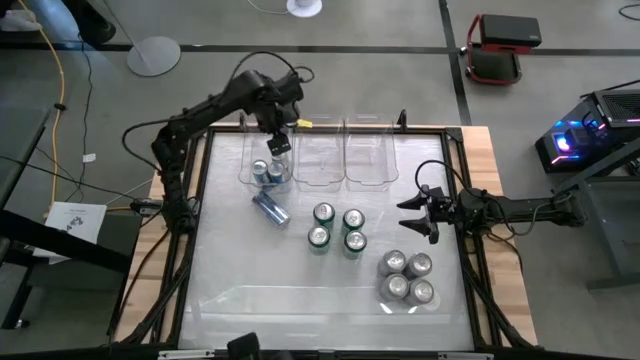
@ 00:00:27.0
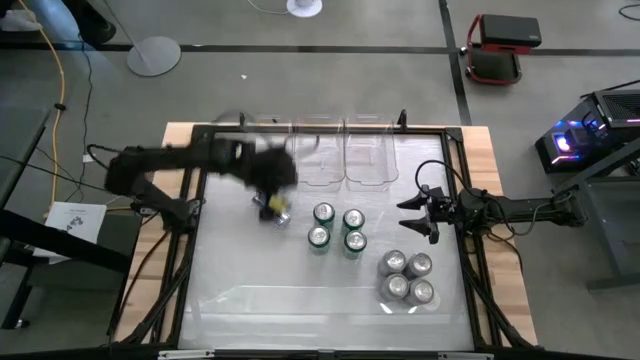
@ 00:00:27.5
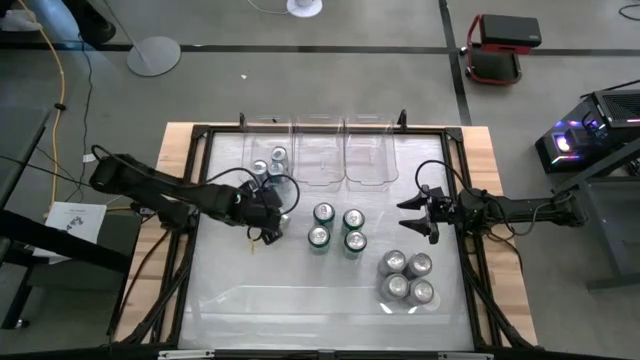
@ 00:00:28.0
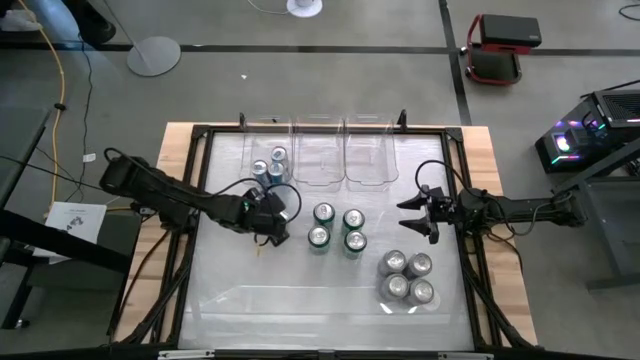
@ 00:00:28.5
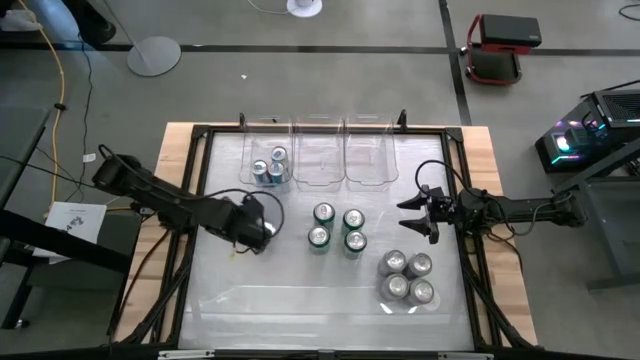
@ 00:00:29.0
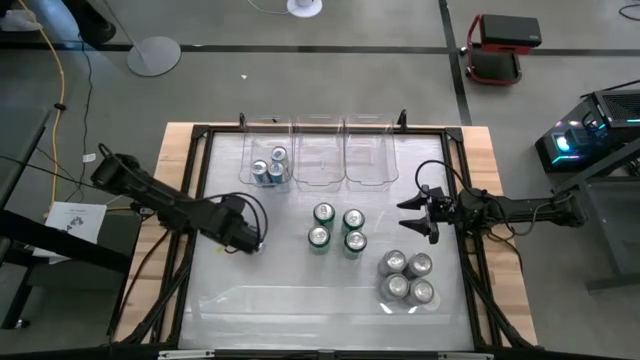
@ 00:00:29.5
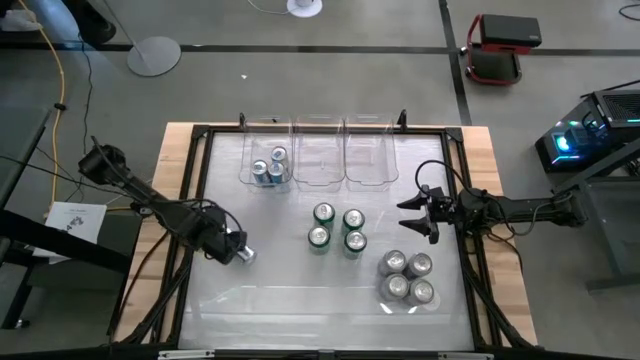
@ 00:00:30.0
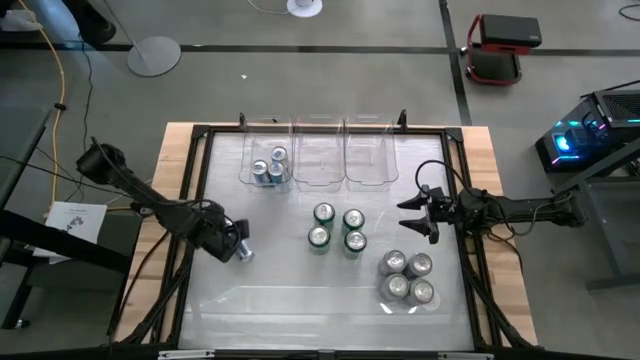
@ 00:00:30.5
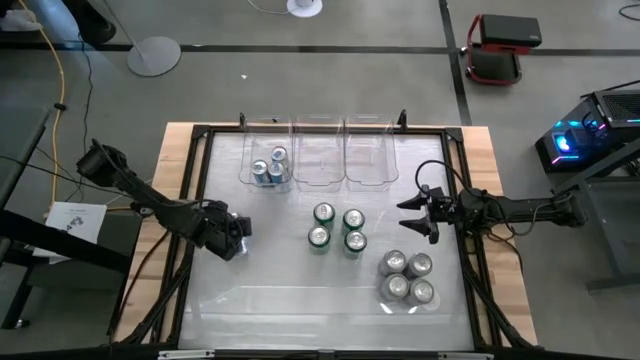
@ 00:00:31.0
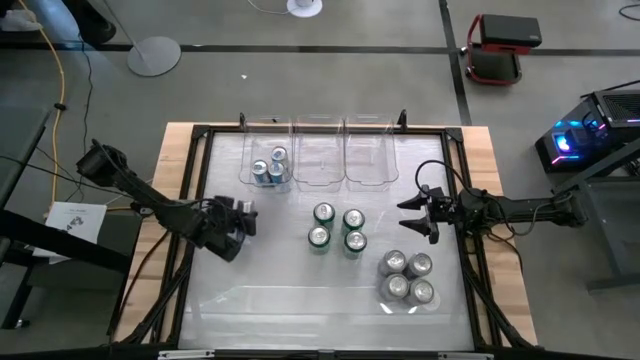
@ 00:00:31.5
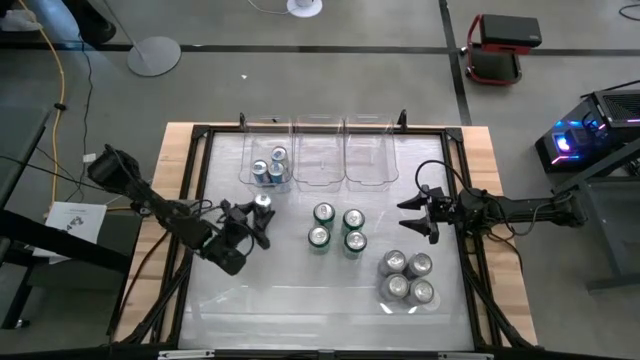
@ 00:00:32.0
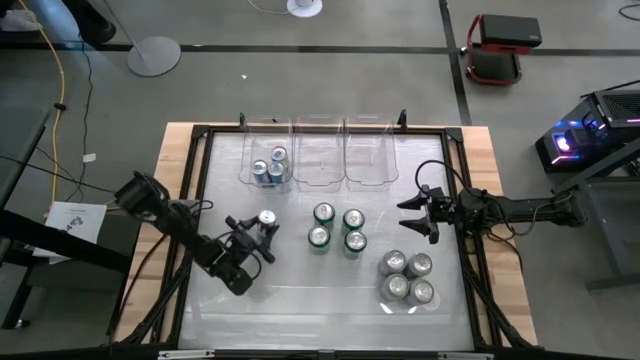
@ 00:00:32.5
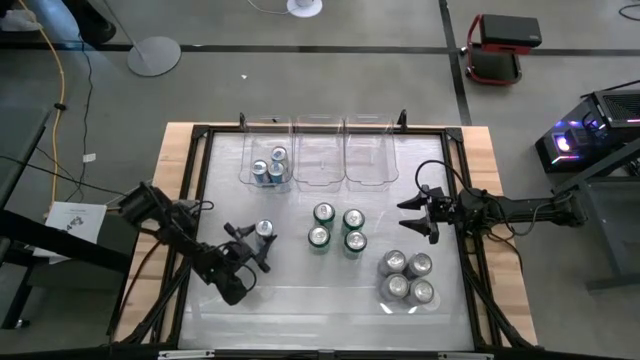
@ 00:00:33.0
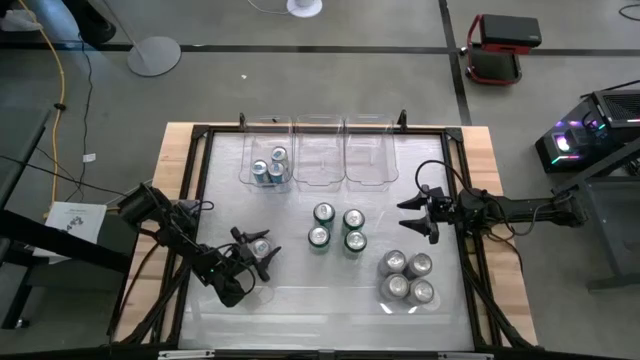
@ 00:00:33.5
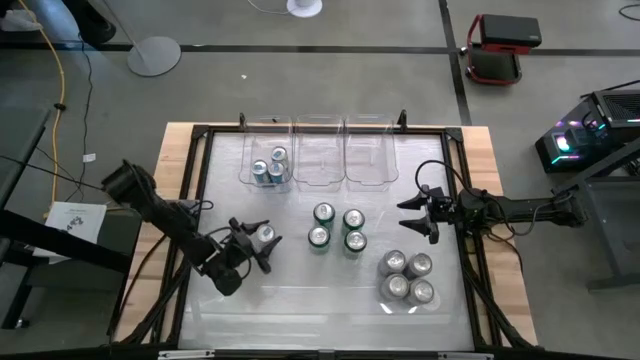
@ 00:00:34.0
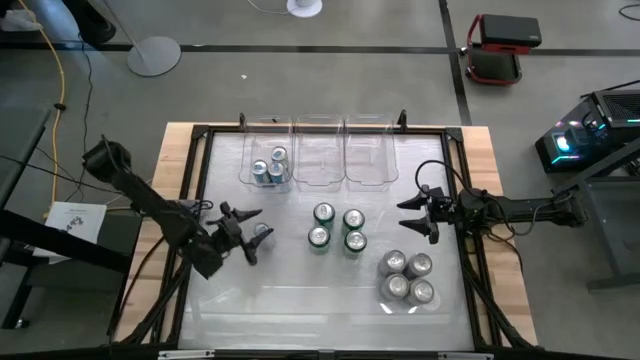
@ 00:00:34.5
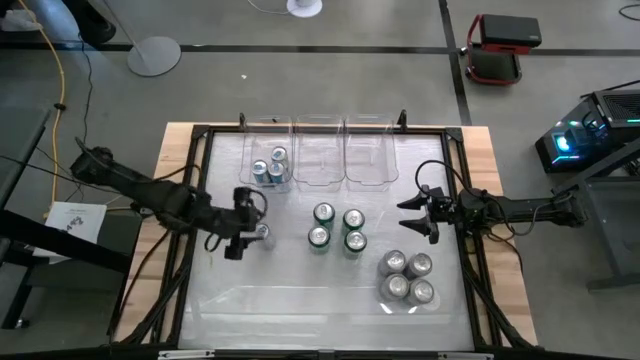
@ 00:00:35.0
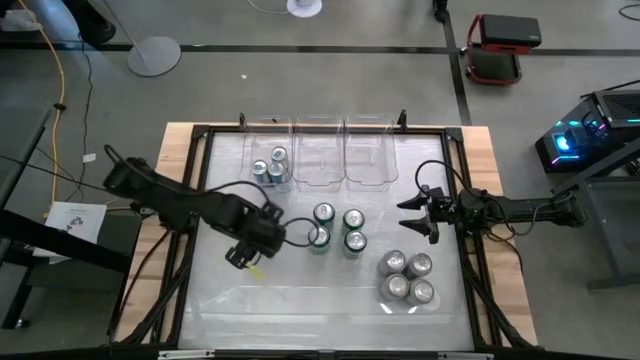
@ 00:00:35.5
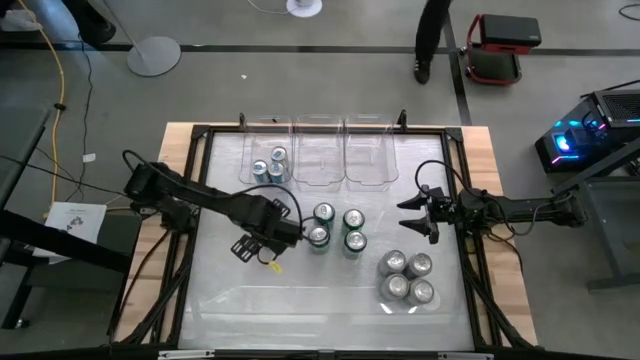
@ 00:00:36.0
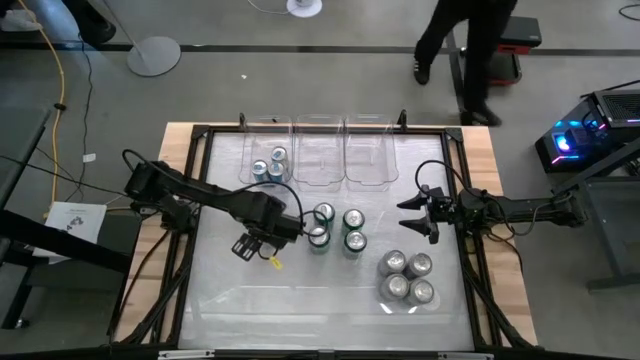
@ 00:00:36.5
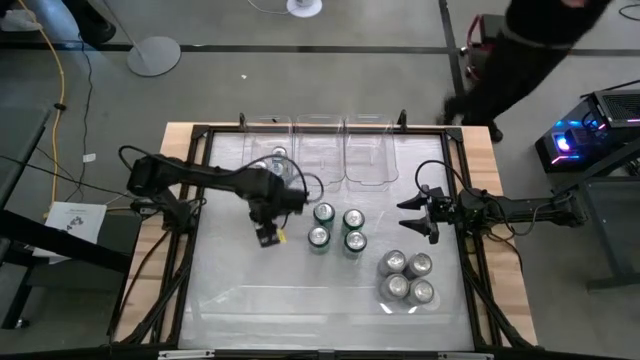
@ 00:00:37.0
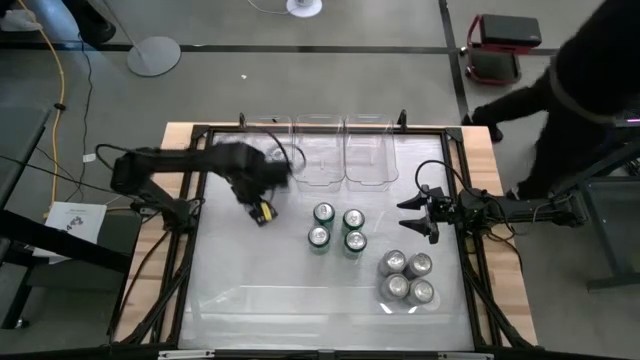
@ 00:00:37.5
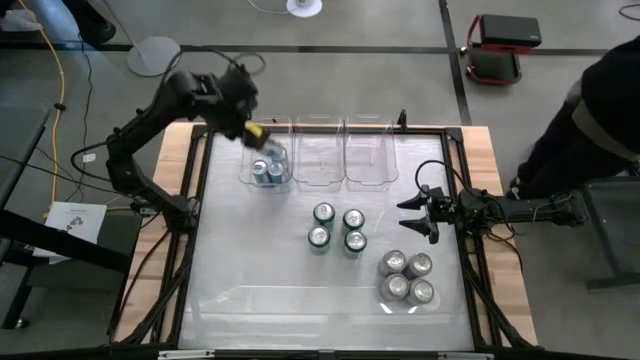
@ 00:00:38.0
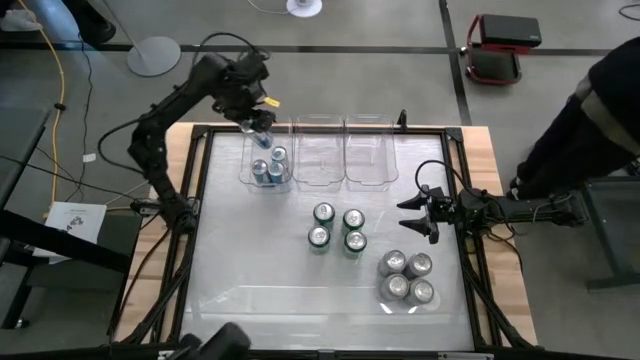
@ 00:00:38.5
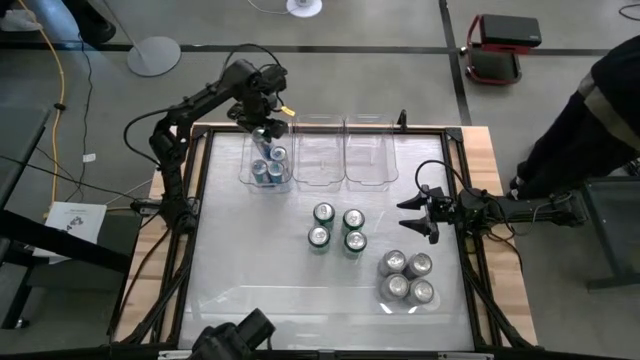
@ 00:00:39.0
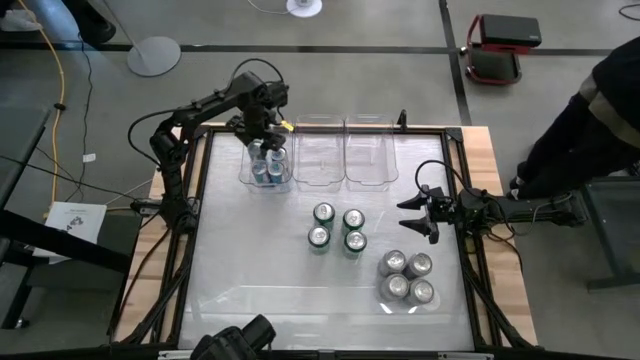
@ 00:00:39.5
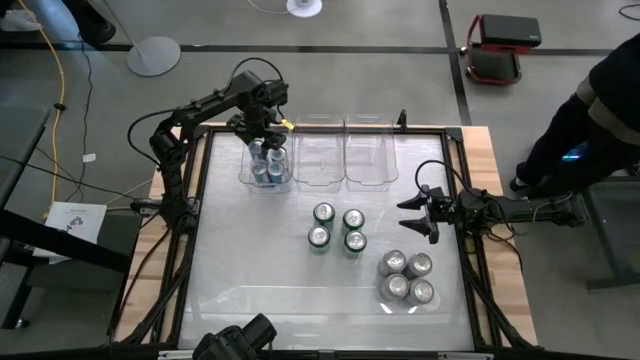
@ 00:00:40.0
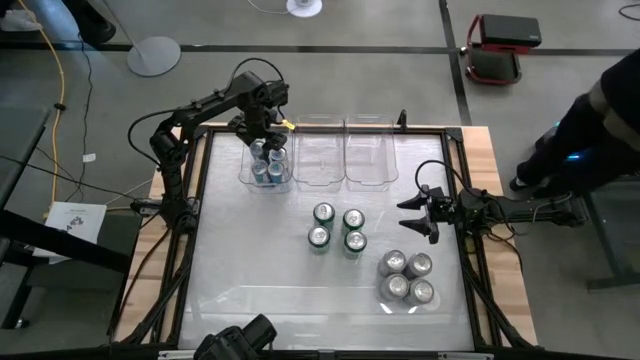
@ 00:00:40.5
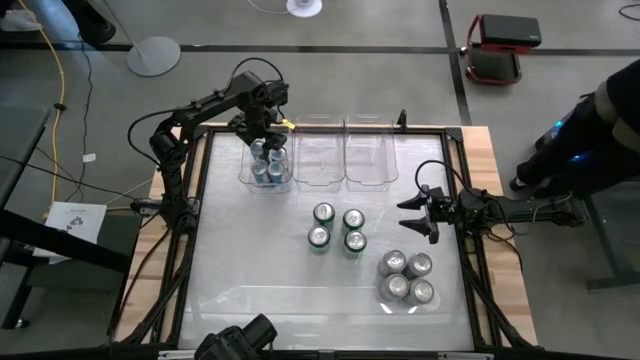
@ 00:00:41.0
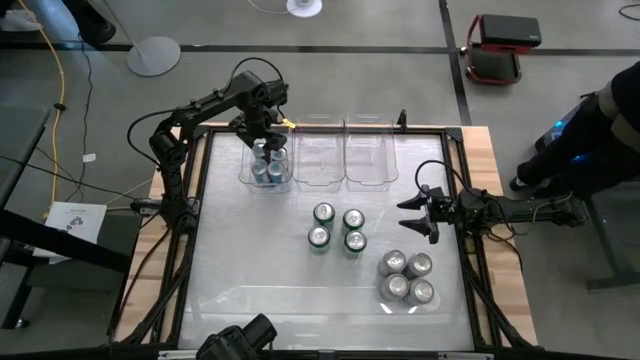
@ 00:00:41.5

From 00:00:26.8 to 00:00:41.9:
Task: Sort soda cans
Put the blue soda can into the left transparent bin

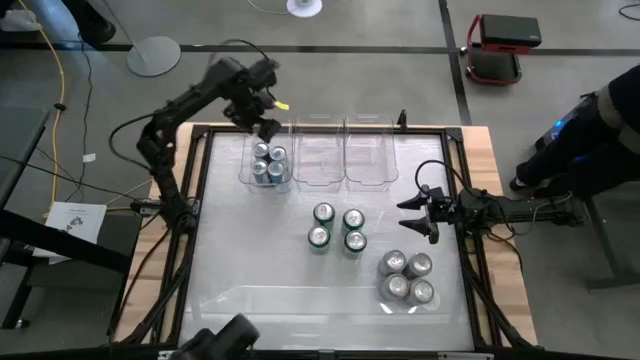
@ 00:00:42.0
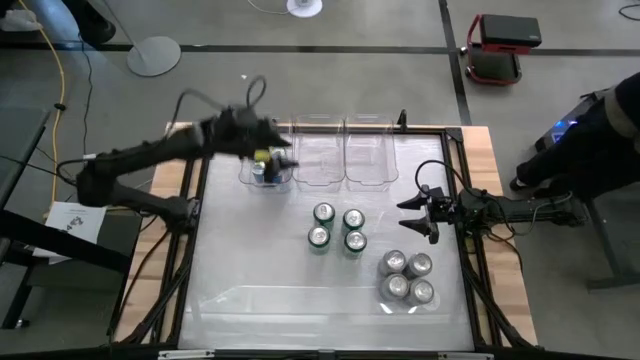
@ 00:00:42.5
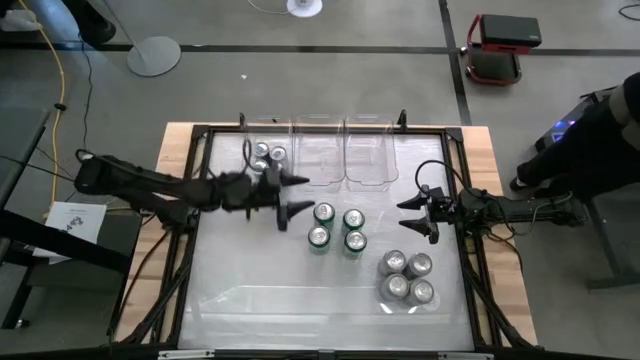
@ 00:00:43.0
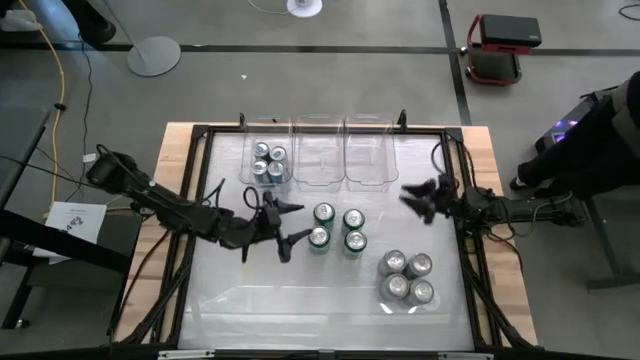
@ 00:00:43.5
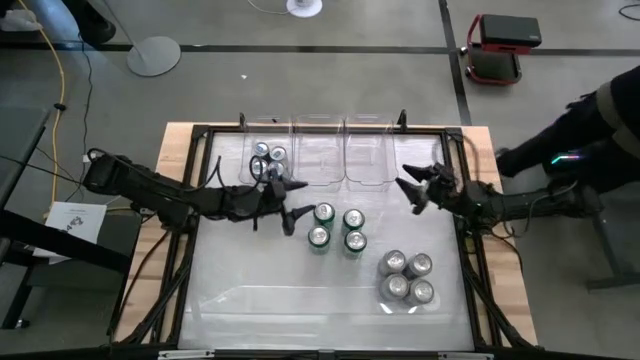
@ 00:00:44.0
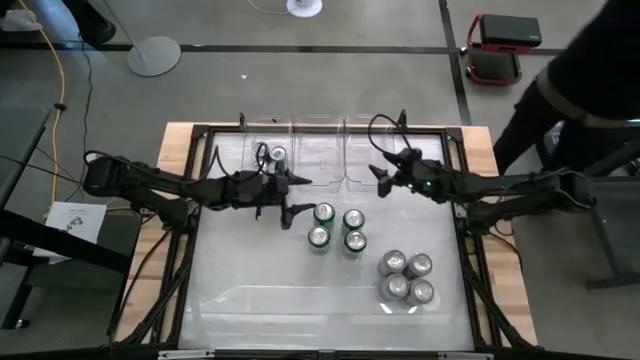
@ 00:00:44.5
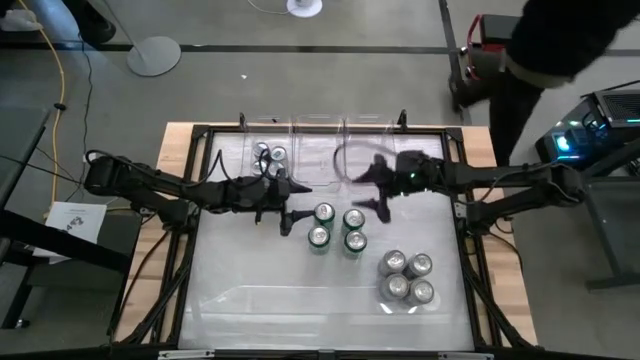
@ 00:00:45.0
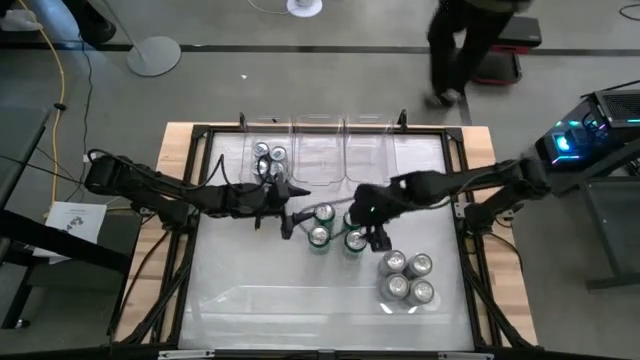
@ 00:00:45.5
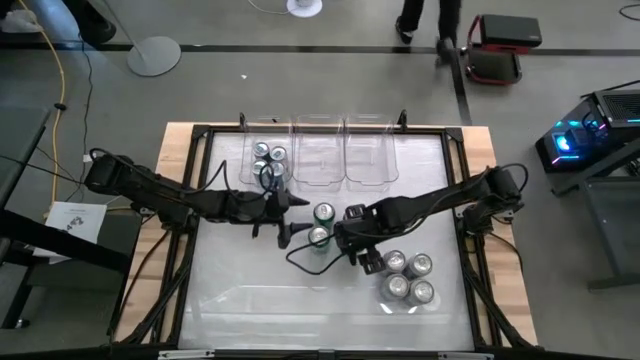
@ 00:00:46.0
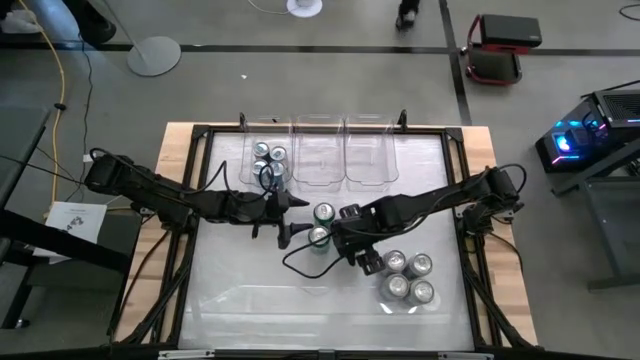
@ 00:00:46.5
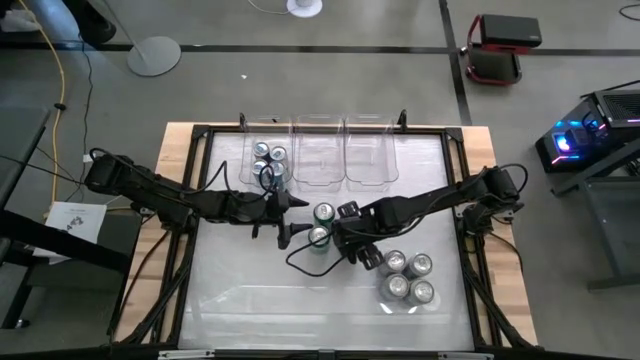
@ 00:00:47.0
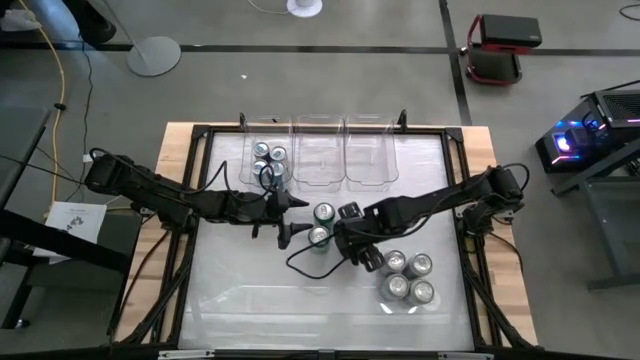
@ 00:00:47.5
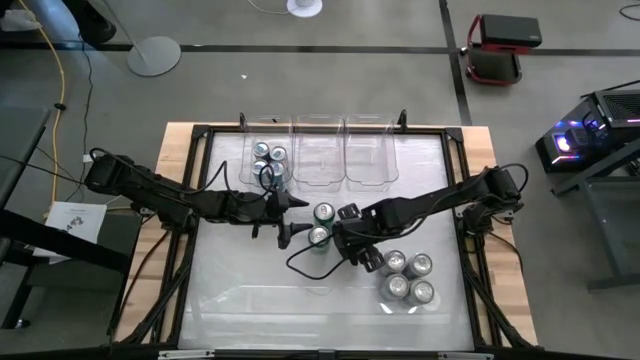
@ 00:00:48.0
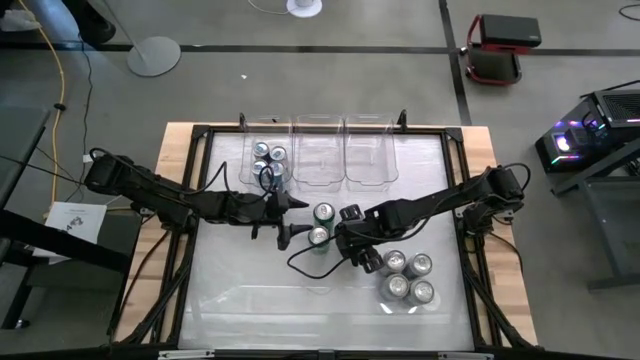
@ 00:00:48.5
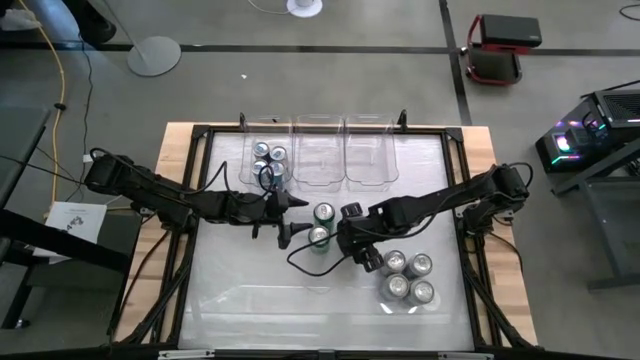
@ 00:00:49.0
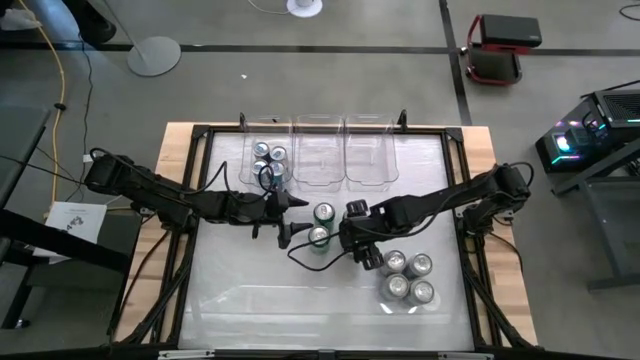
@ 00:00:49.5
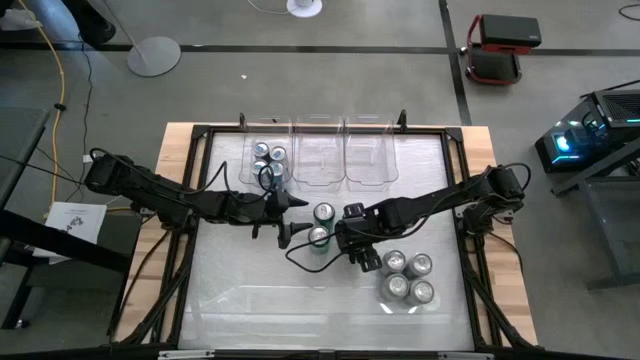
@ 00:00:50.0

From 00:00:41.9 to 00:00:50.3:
Put the bottom right green soda can into the center transparent bin
